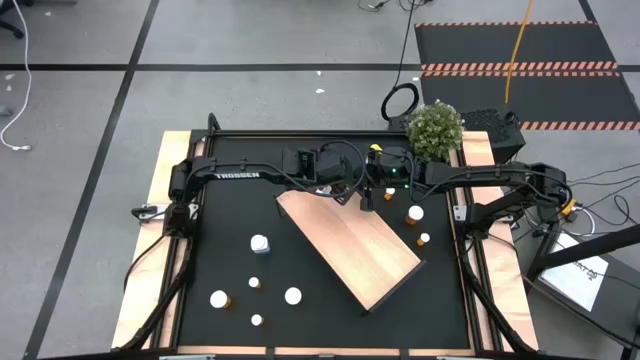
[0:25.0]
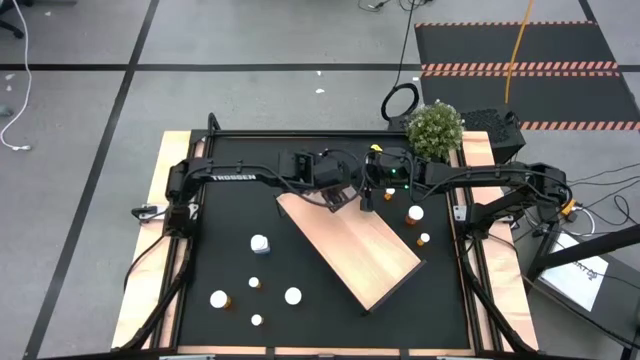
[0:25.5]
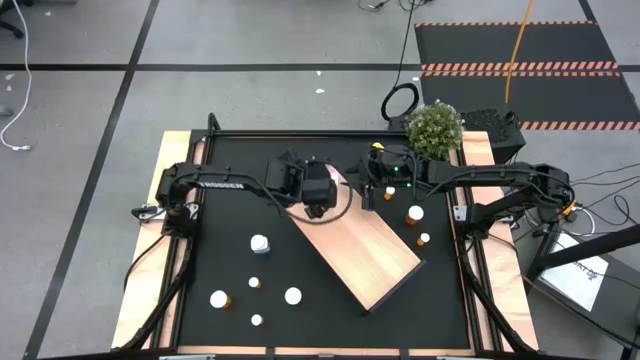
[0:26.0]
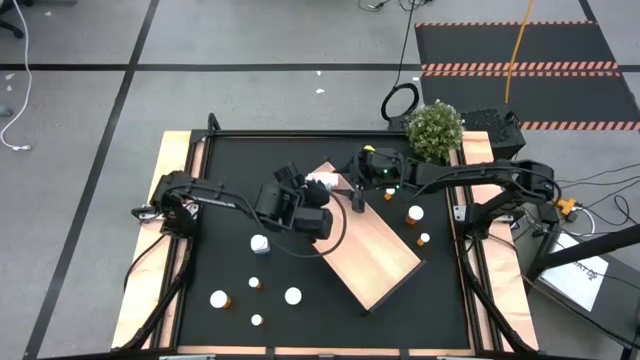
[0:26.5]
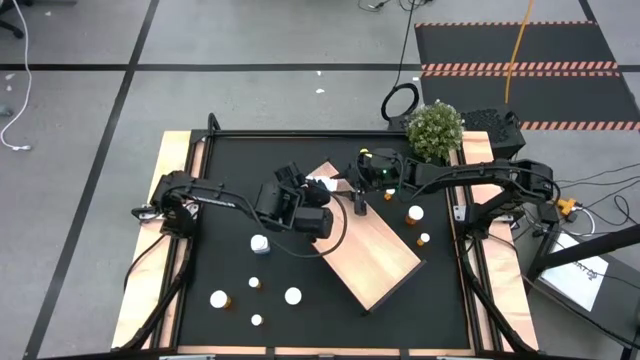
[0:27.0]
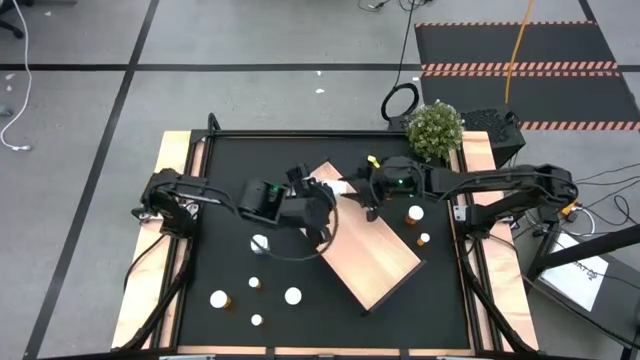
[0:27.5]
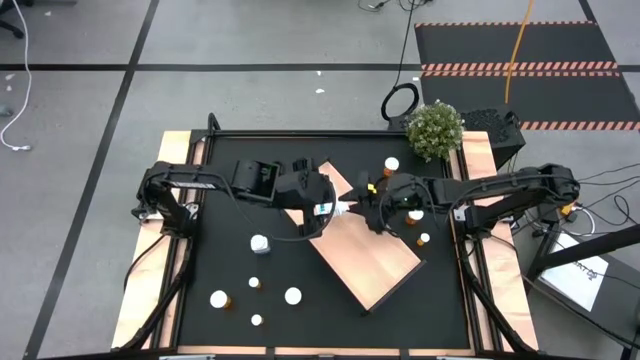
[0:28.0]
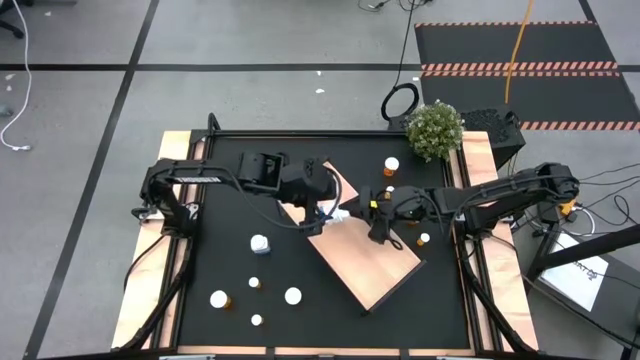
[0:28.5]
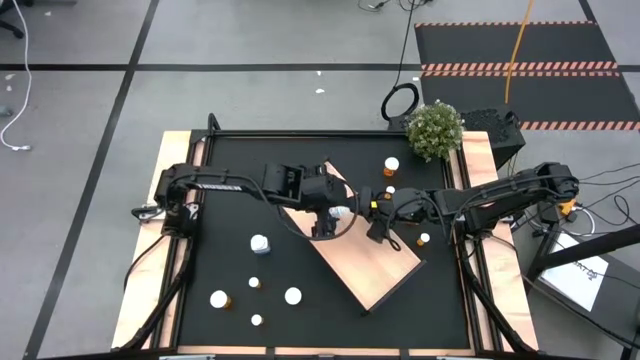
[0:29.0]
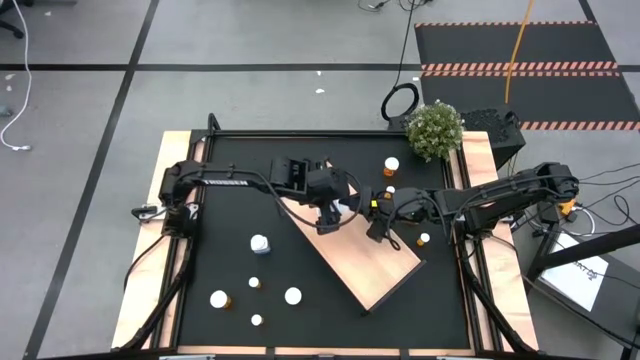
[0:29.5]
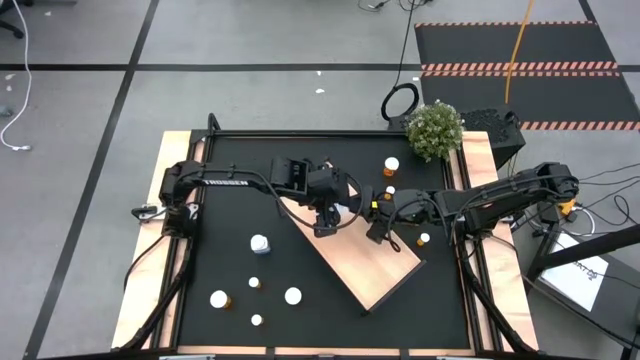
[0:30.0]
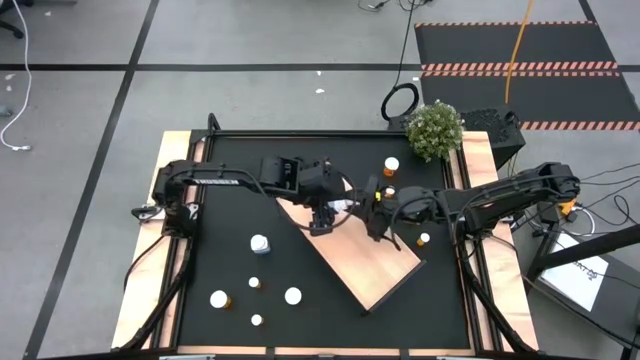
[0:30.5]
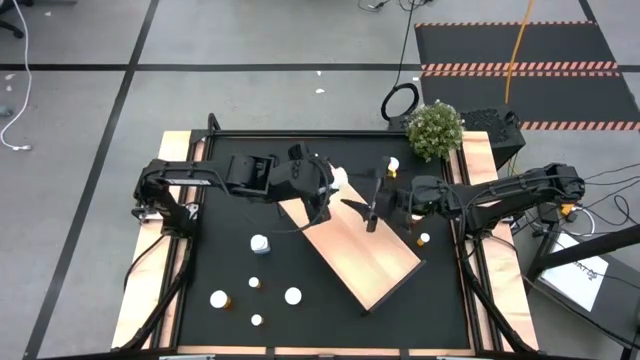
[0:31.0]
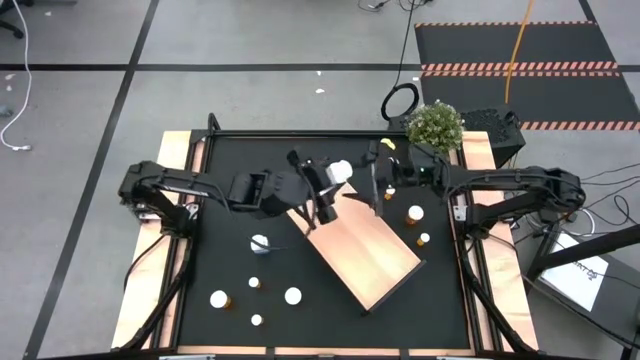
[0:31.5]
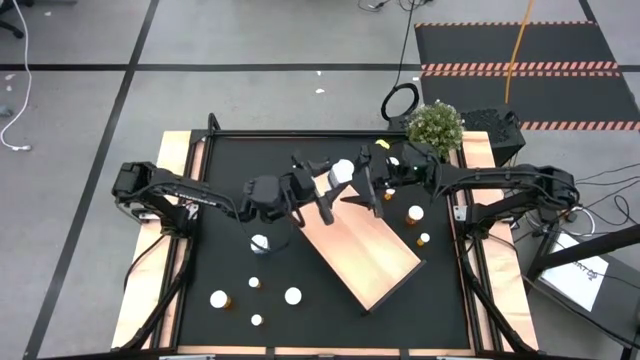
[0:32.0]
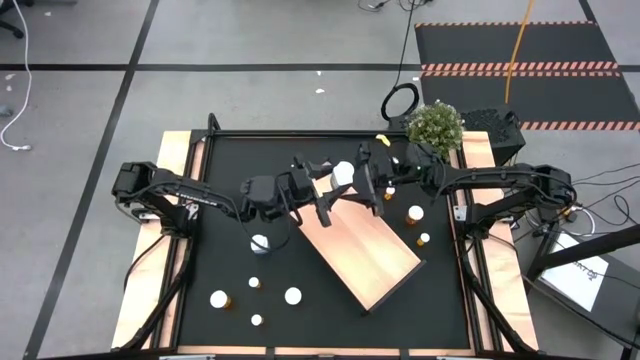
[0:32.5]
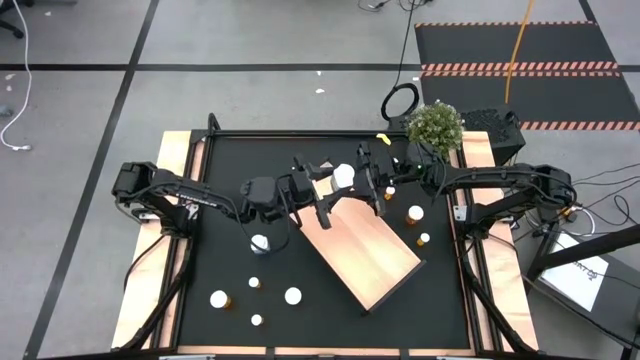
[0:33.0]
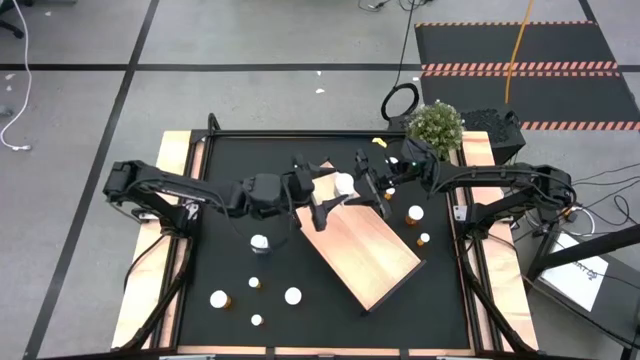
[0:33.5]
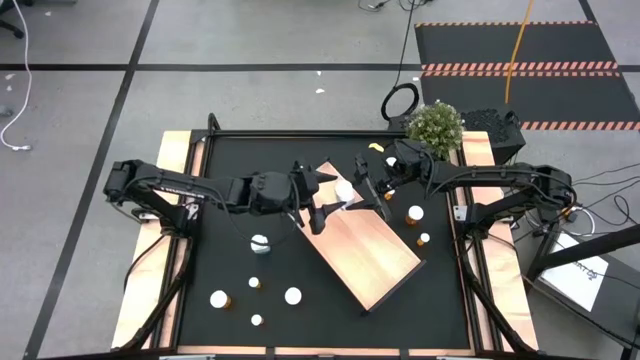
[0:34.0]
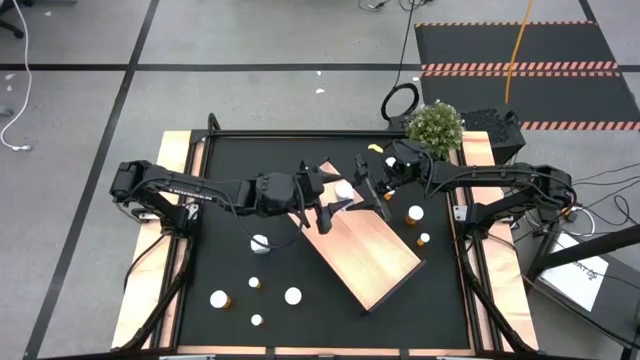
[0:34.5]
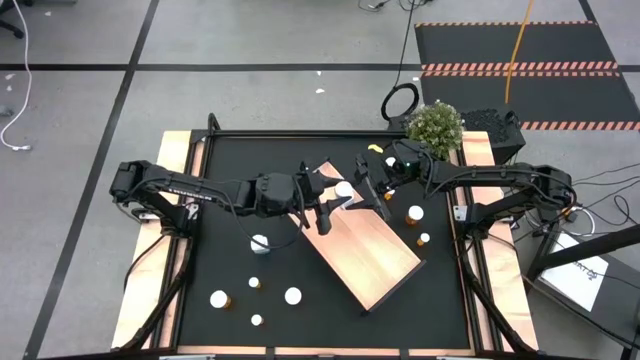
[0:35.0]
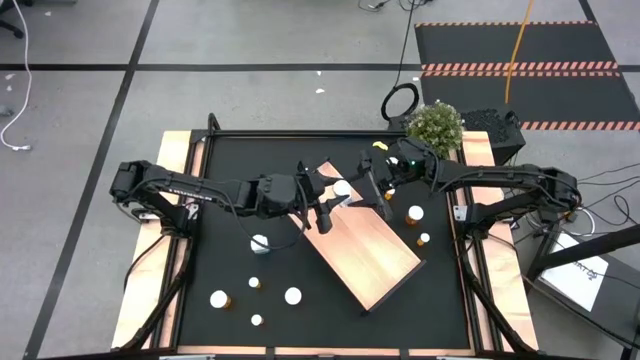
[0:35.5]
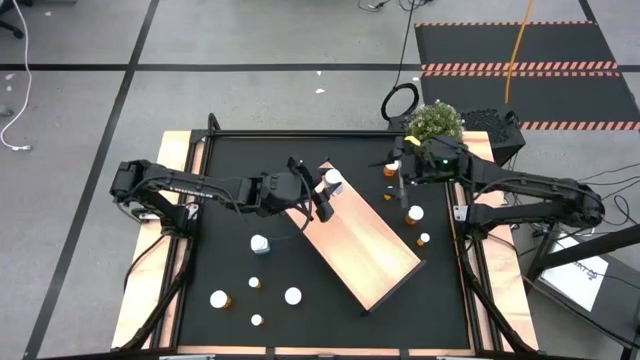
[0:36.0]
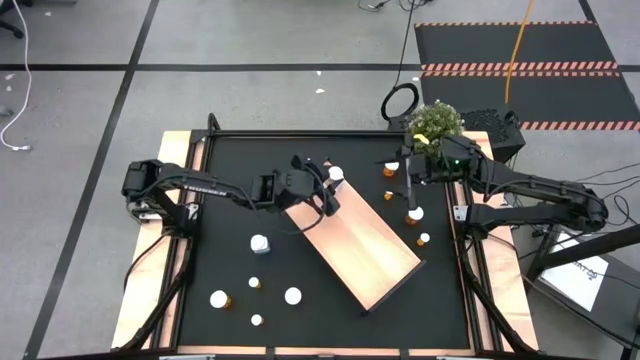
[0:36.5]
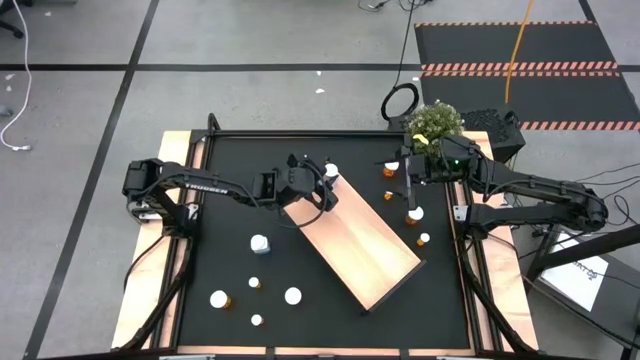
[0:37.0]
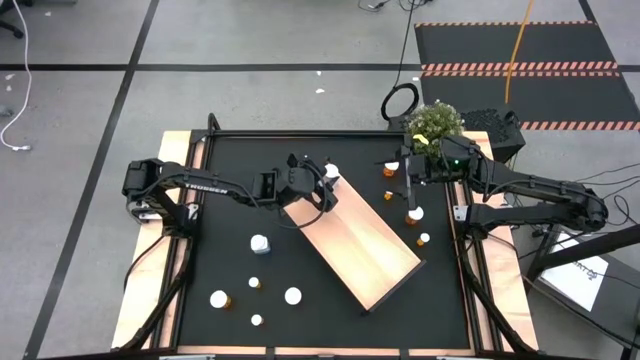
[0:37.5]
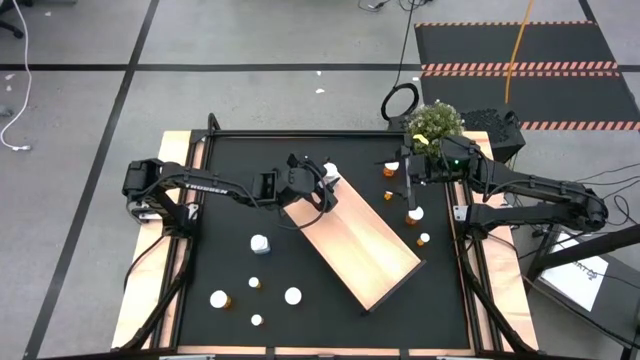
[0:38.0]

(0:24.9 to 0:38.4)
Task: Pick and place medicine bottles onto shelf by color
Put the top white pill bottle on the shelf

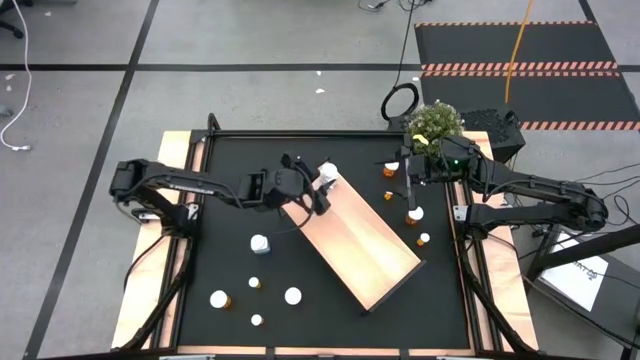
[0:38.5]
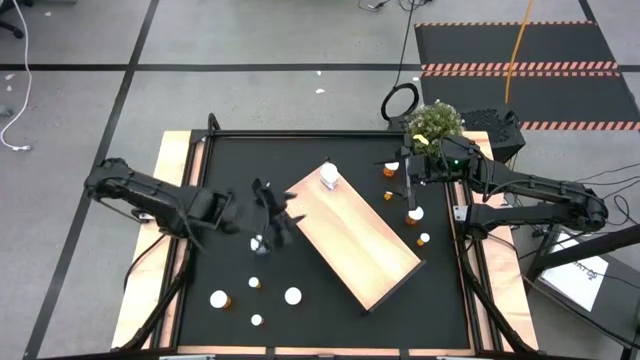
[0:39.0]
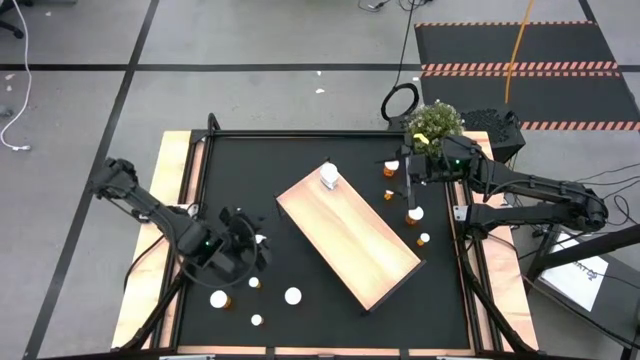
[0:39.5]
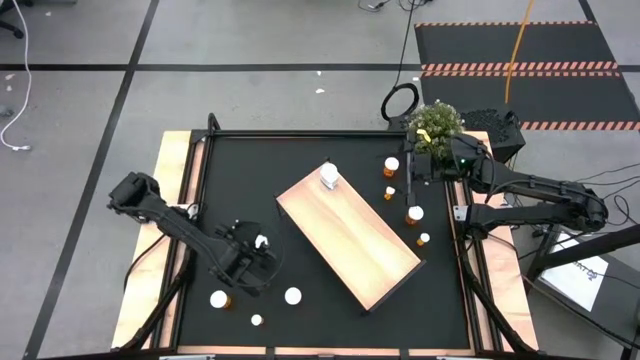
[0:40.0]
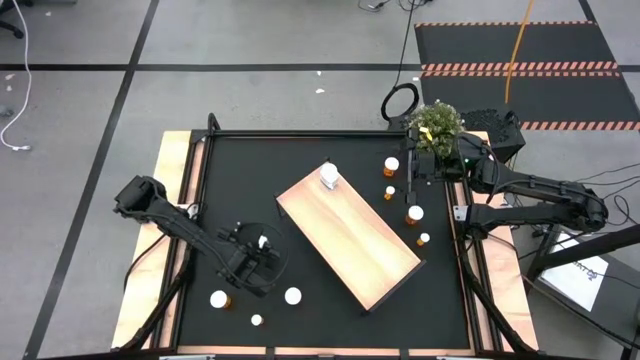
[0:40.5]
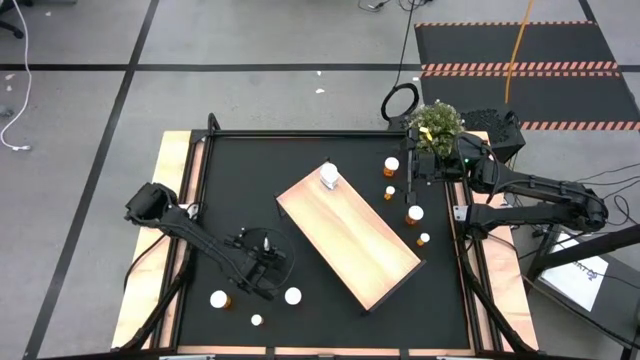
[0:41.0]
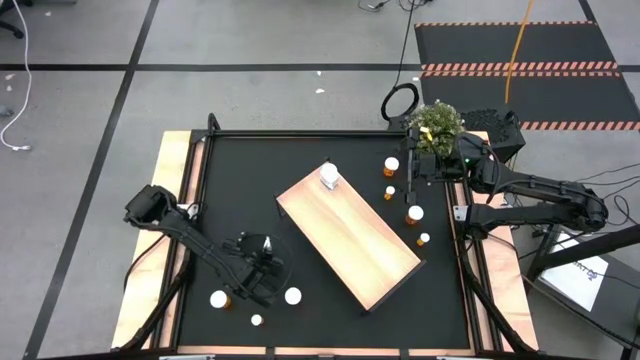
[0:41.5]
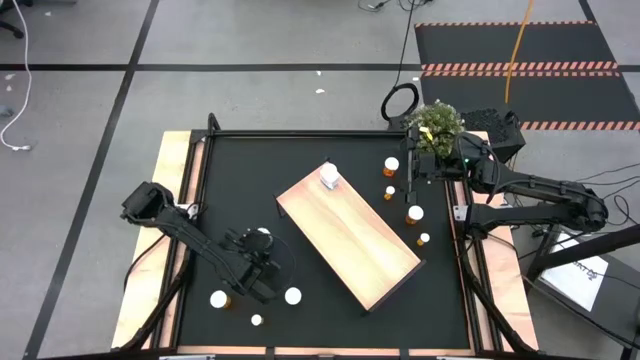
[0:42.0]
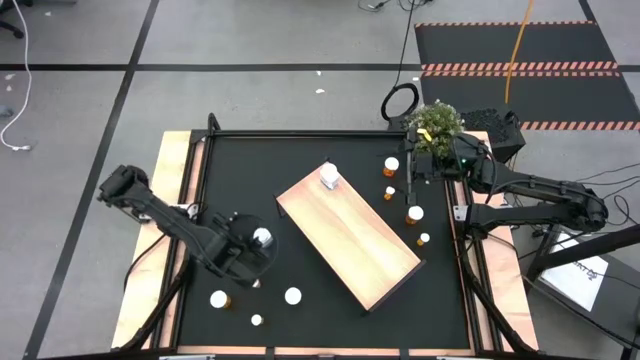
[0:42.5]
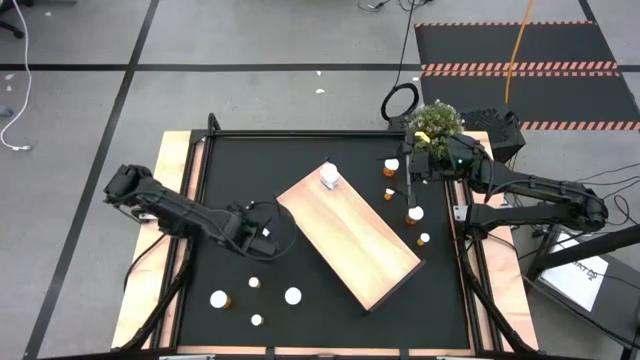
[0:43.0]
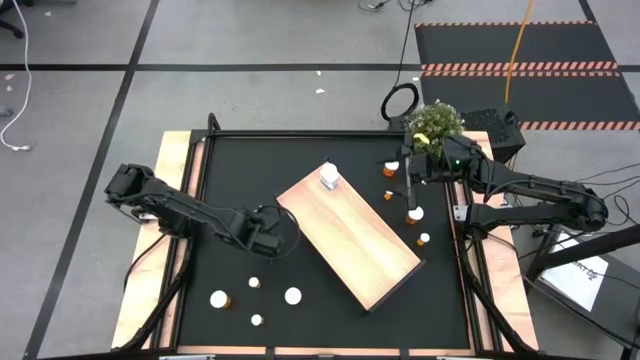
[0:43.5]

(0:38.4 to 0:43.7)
Put the white pill bottle on the shelf
